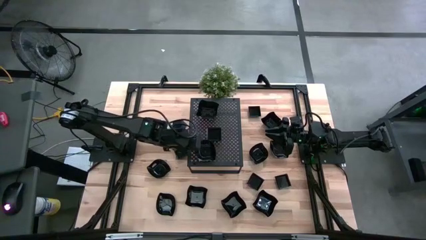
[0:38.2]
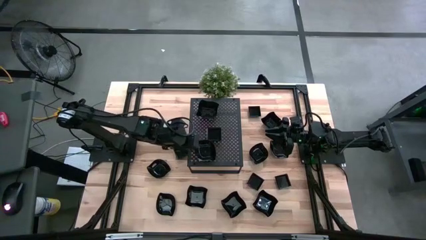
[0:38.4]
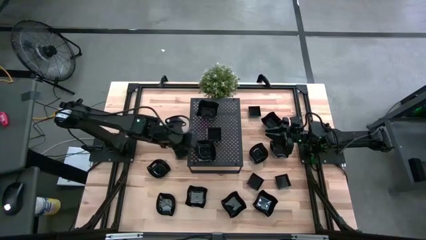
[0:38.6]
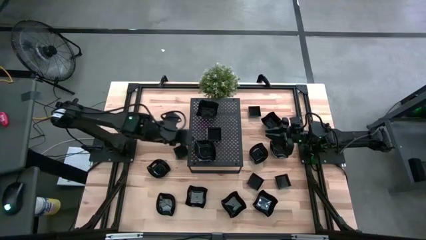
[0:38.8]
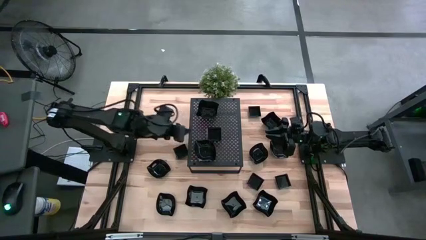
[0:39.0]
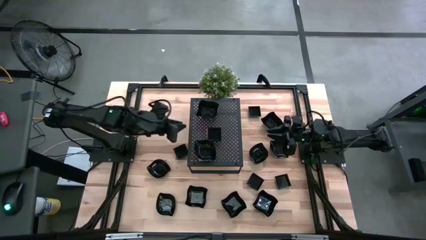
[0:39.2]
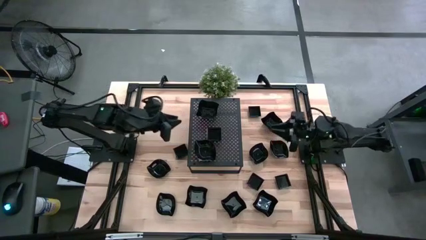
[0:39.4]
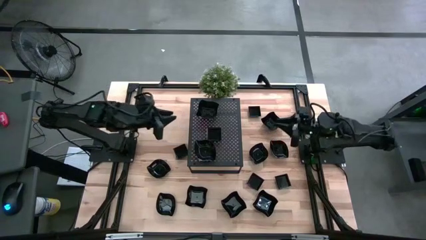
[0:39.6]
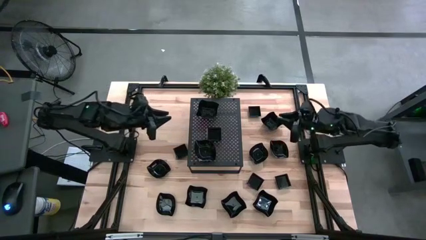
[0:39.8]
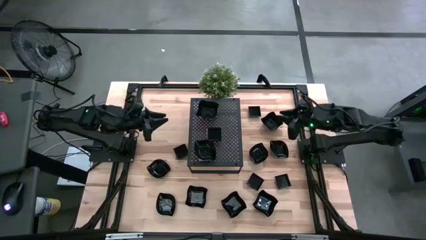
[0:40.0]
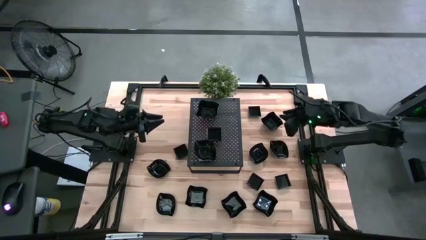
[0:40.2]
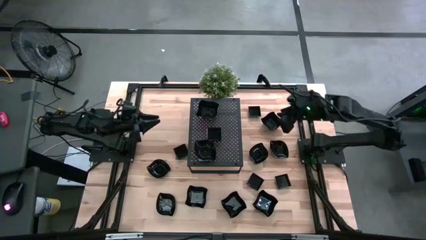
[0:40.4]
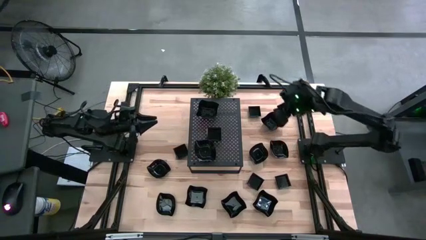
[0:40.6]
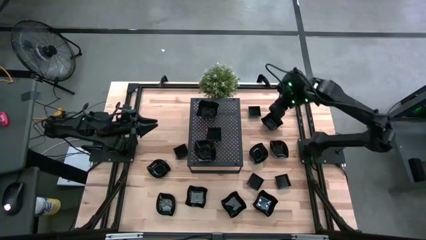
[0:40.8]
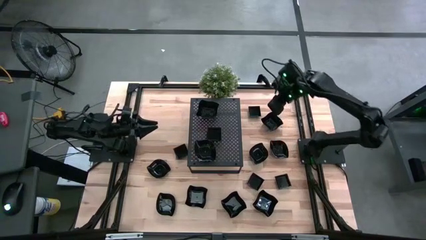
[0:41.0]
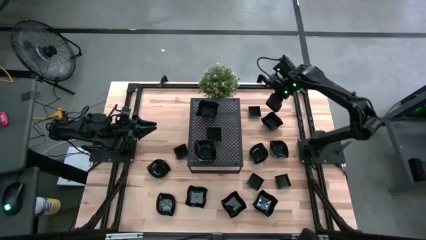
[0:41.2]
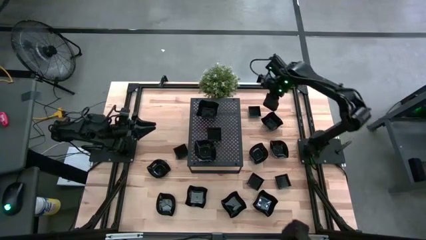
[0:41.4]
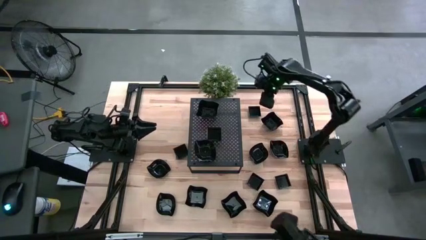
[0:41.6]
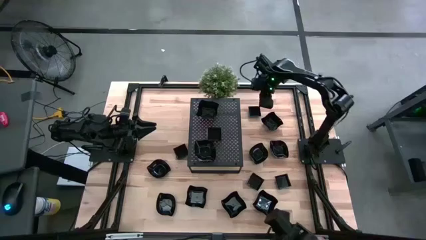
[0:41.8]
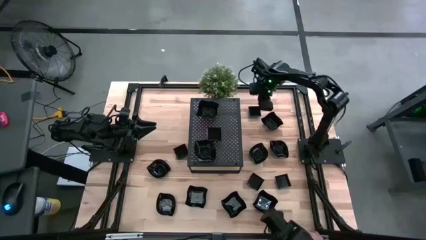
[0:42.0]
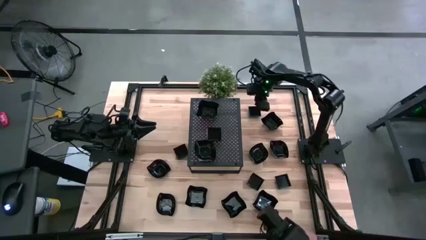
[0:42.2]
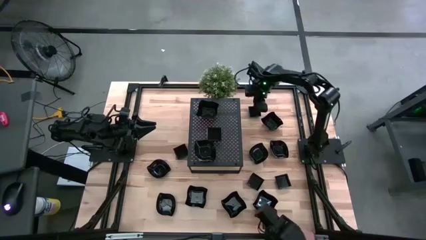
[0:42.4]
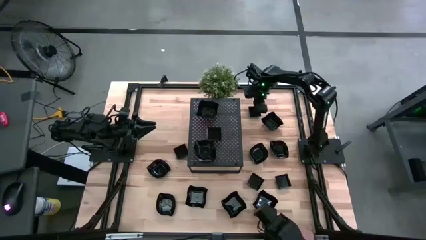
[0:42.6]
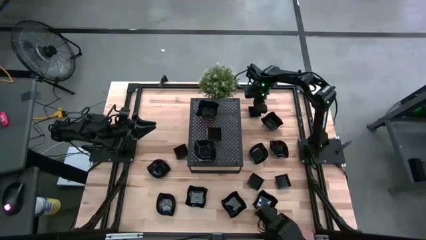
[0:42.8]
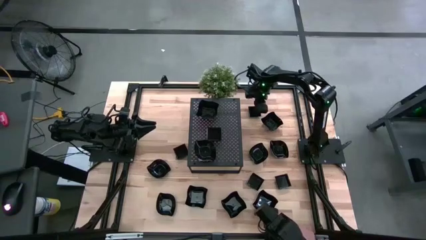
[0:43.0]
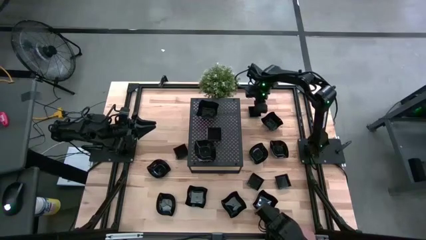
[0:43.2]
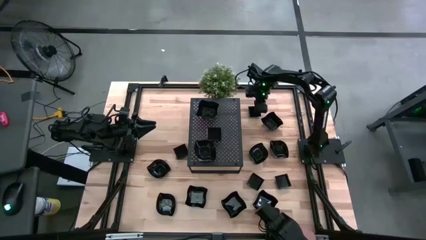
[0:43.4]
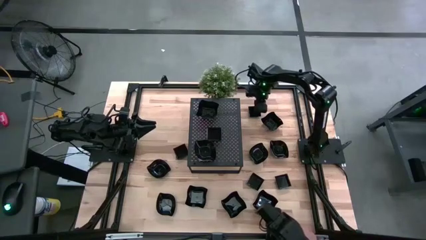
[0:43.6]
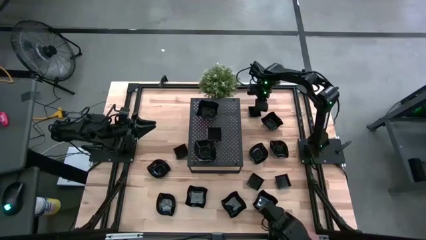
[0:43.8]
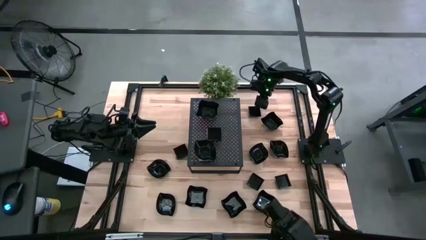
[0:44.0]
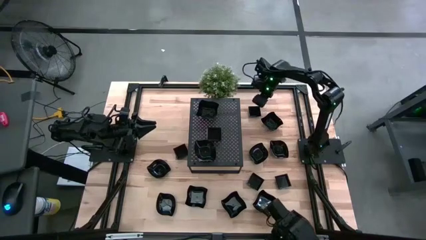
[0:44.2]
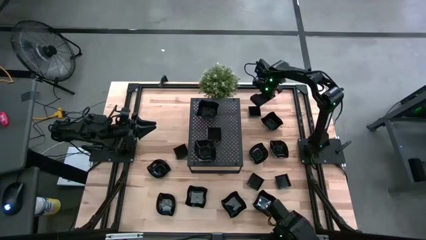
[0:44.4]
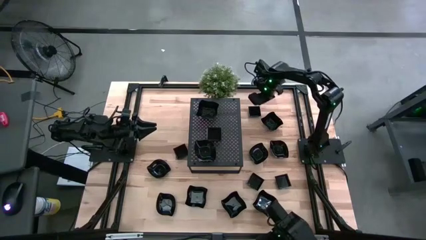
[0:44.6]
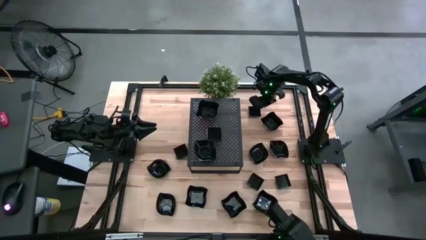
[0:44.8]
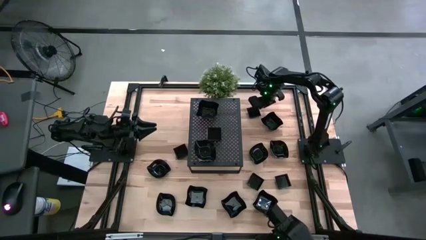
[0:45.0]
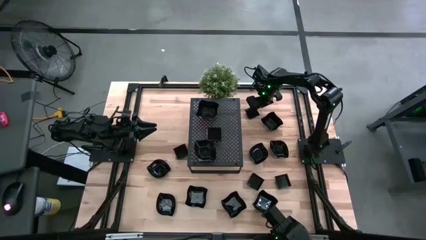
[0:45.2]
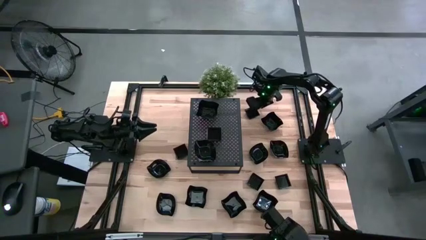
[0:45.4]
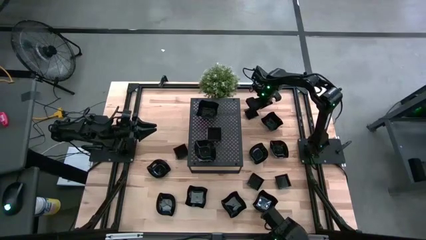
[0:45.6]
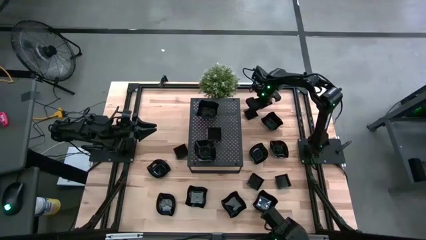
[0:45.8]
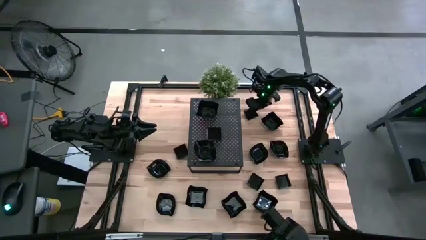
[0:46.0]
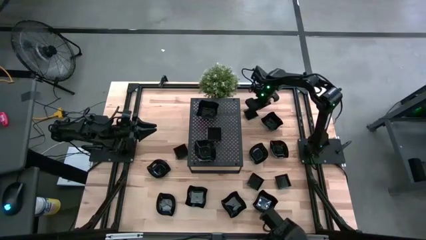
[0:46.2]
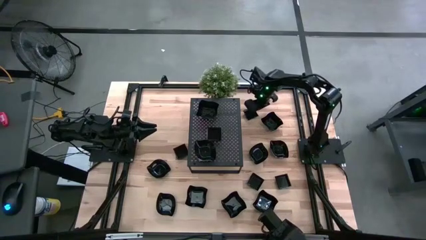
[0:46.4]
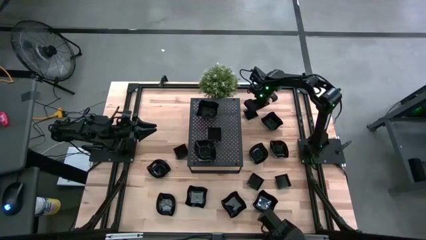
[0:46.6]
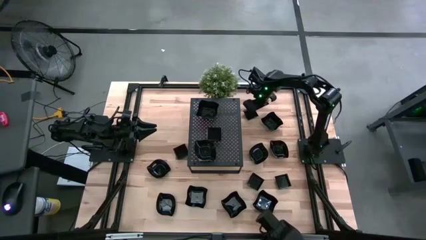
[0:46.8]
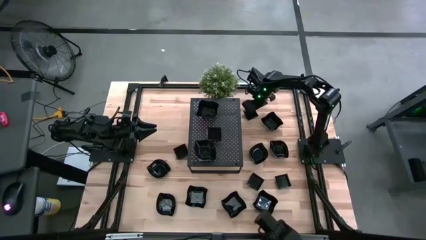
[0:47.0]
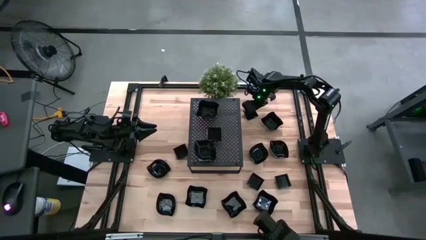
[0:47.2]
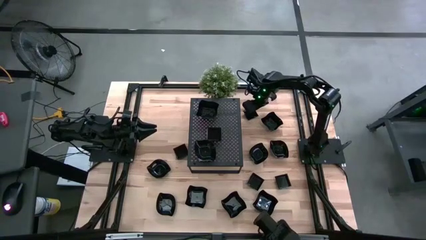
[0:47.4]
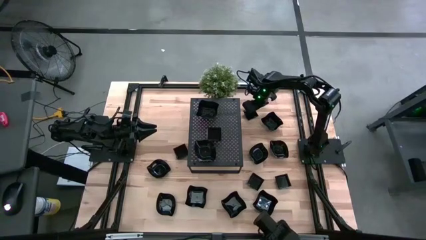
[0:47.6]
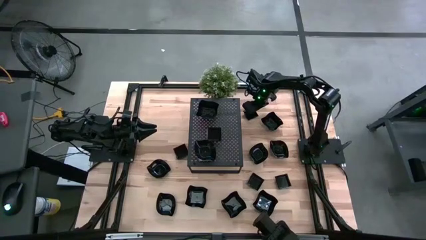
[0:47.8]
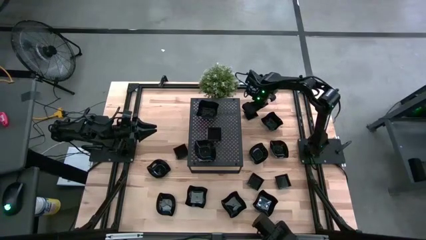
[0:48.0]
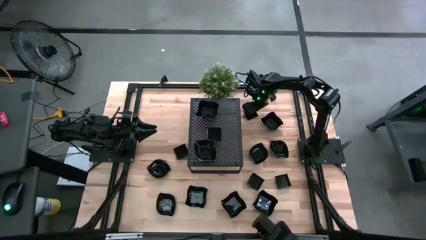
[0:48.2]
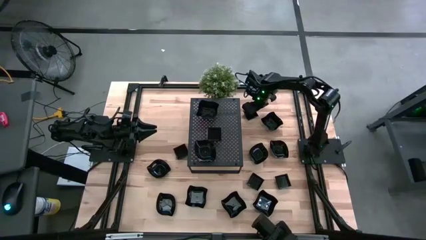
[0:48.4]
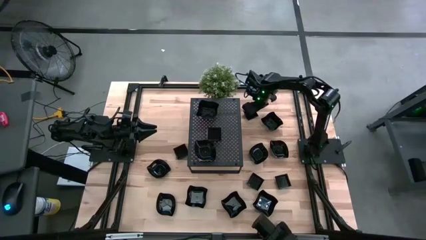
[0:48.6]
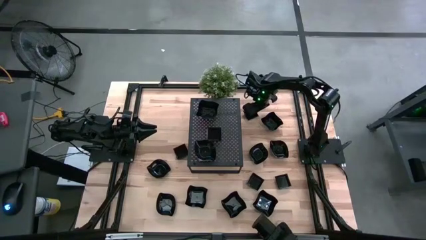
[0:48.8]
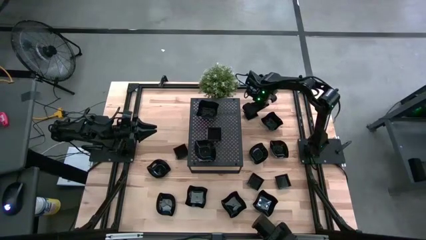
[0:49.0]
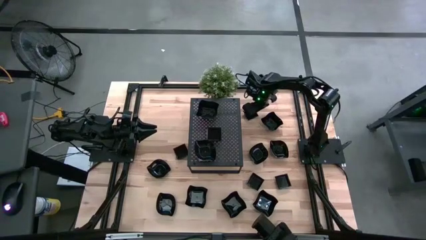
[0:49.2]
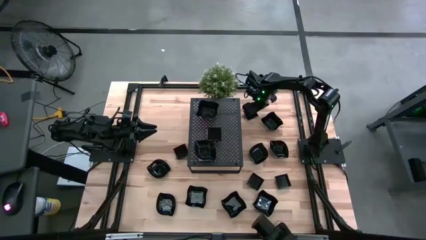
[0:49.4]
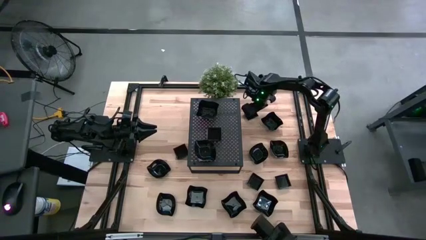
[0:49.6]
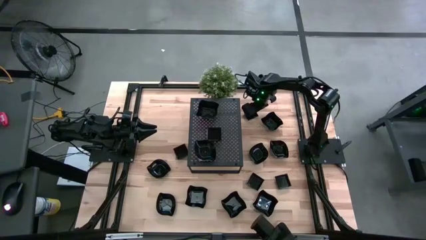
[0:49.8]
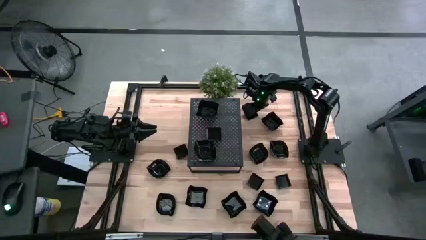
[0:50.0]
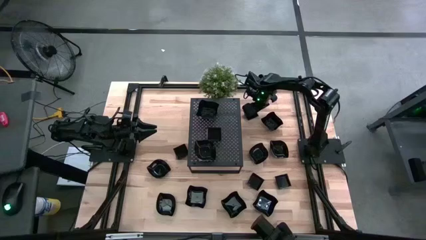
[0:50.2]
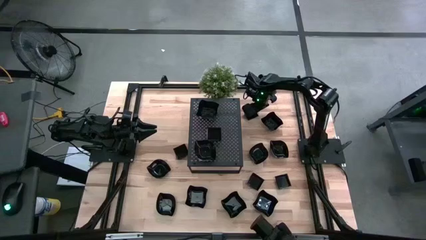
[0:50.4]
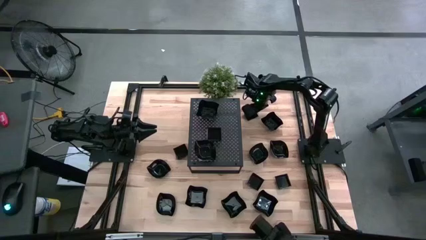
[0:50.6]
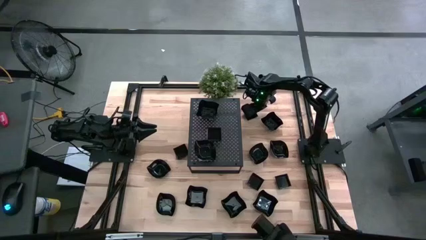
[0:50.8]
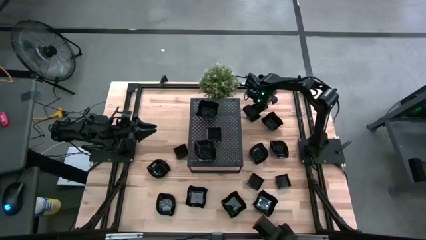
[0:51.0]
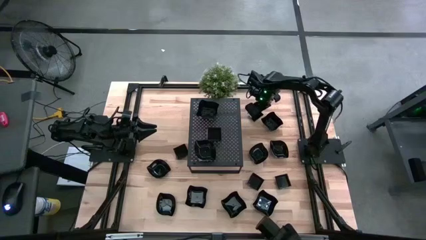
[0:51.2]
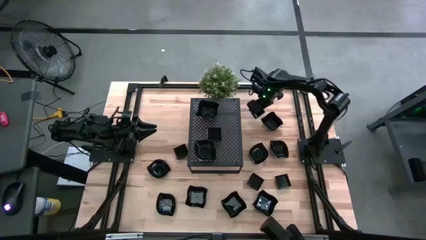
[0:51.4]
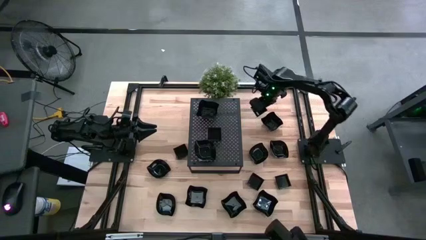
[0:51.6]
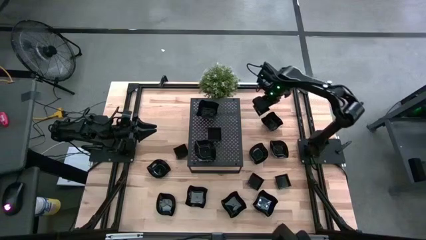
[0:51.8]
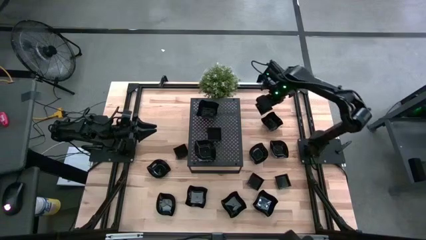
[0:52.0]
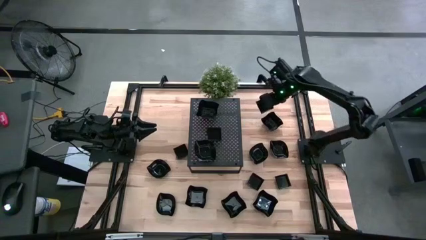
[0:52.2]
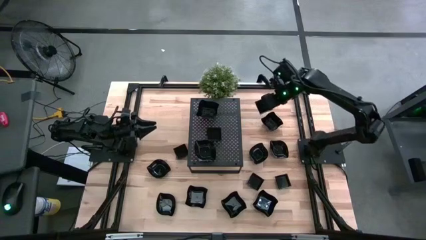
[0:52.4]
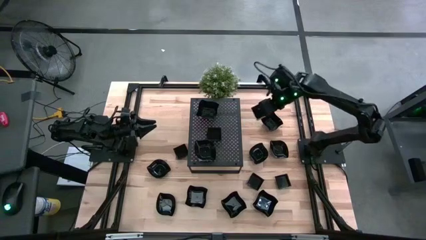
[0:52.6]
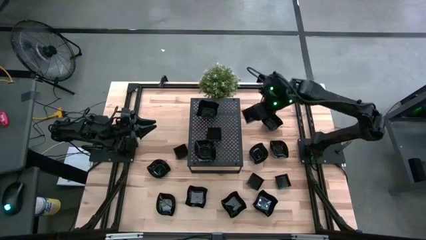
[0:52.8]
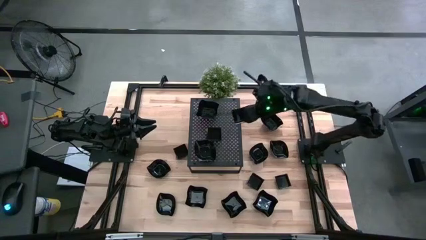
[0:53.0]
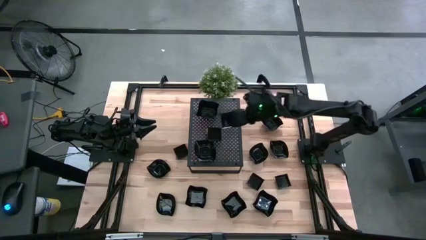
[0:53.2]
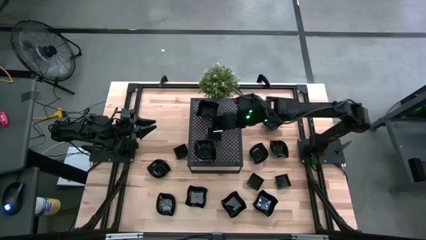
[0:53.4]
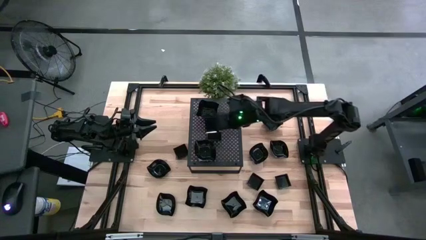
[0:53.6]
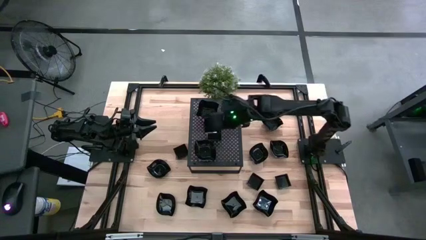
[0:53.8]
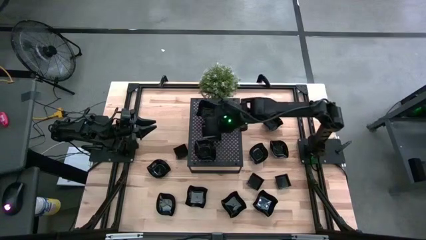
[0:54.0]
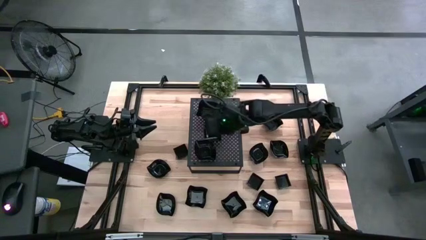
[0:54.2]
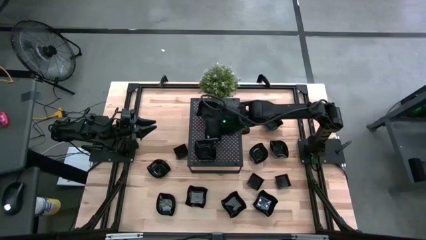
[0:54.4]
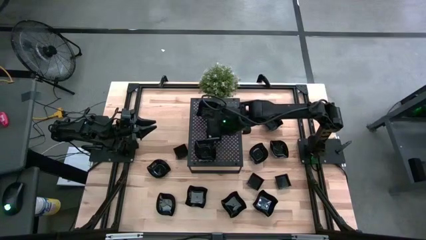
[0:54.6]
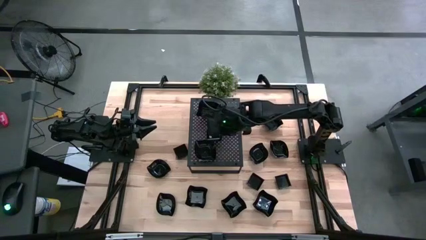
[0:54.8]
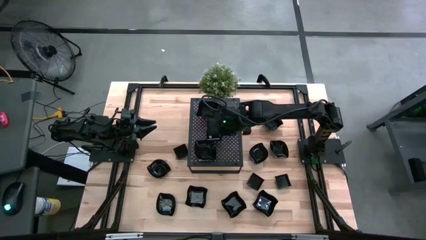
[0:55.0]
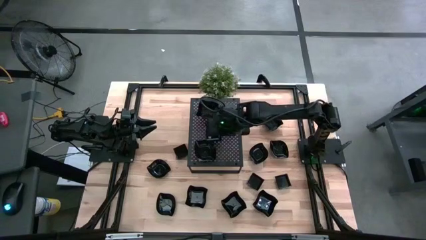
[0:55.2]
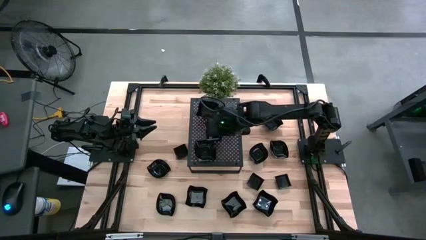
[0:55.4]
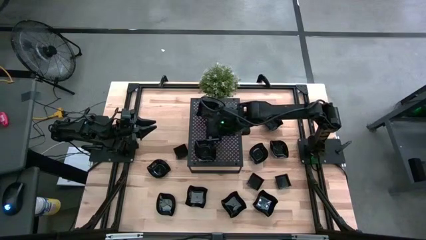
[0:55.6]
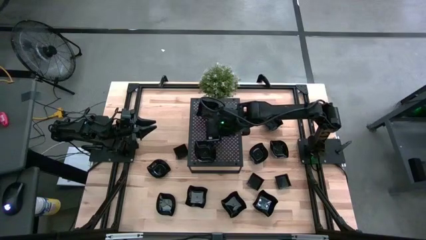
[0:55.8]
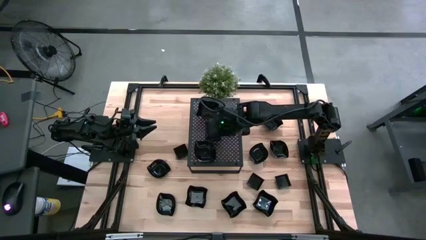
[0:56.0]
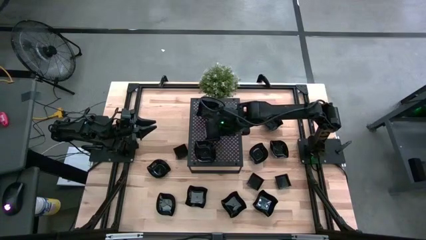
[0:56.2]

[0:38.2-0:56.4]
Task: Pick & Place Mini shaped plates
Stack the square plate on top of the square plate on the shelf
